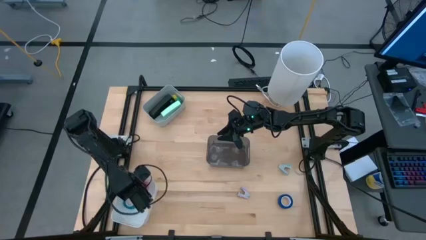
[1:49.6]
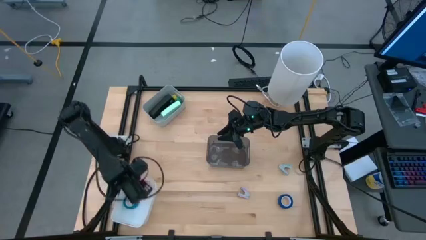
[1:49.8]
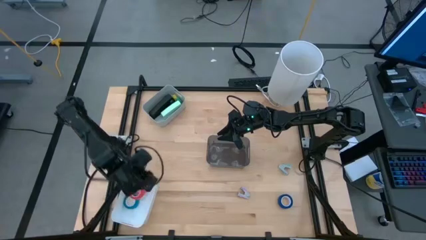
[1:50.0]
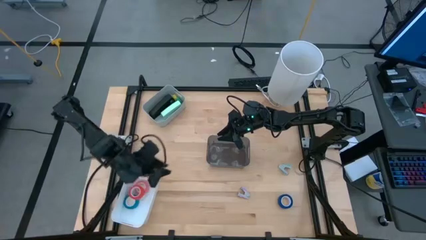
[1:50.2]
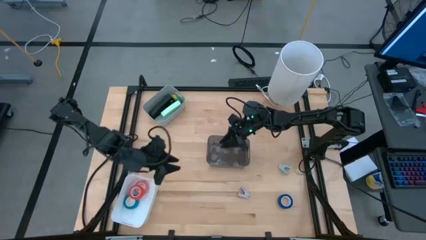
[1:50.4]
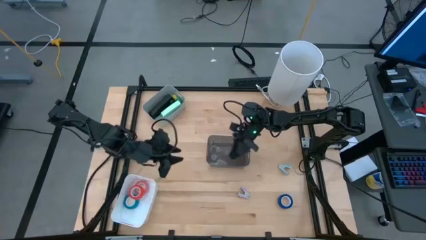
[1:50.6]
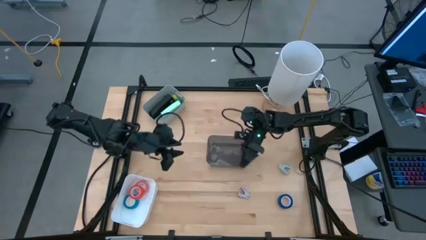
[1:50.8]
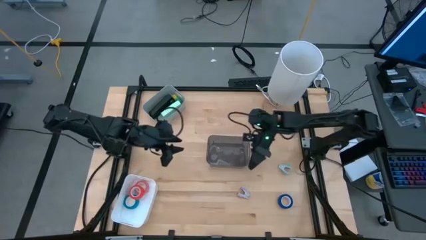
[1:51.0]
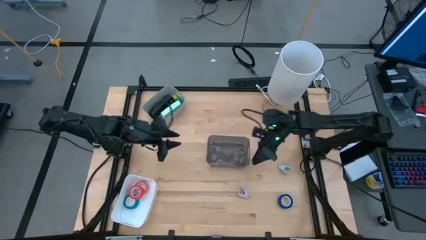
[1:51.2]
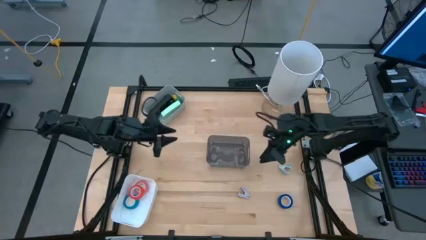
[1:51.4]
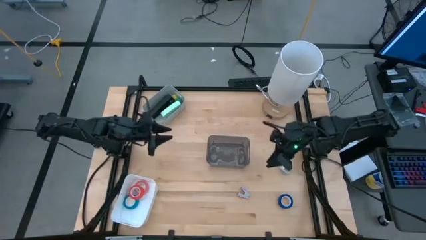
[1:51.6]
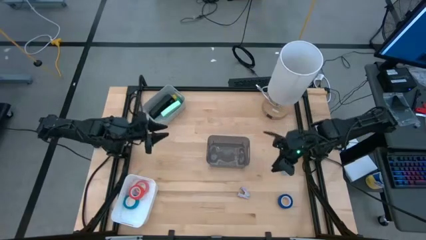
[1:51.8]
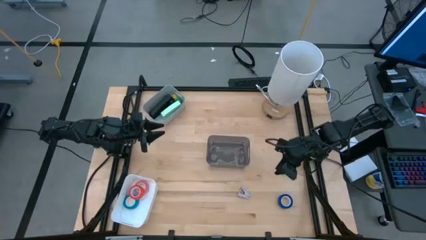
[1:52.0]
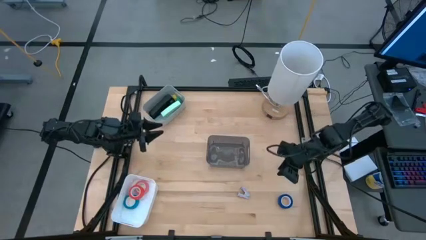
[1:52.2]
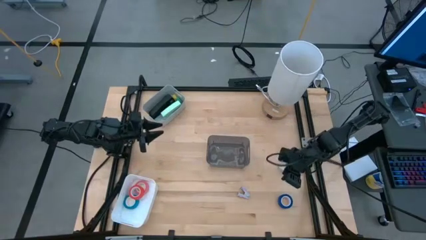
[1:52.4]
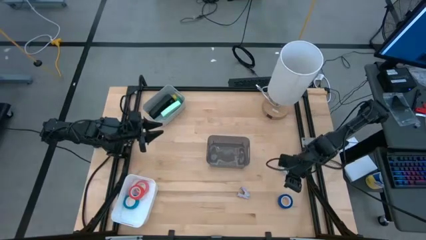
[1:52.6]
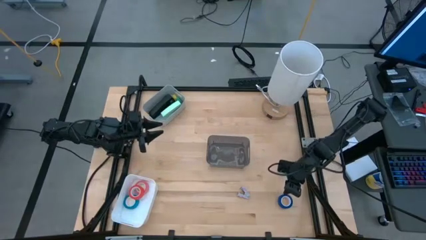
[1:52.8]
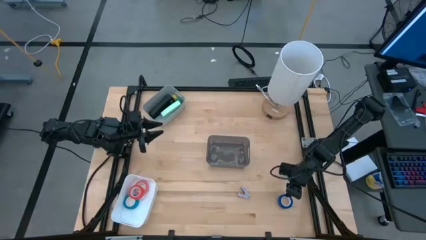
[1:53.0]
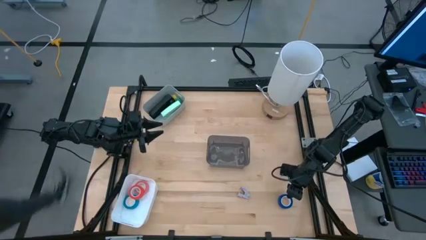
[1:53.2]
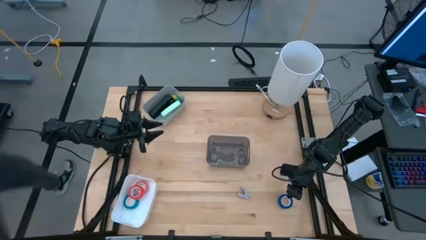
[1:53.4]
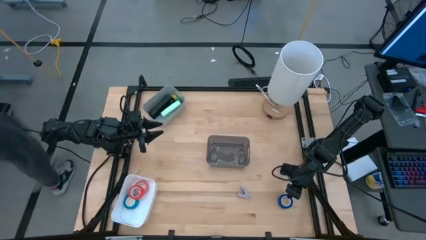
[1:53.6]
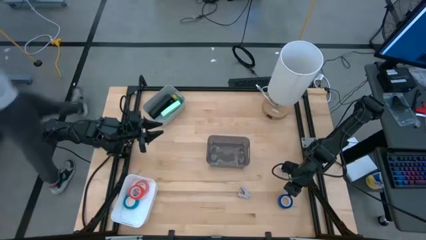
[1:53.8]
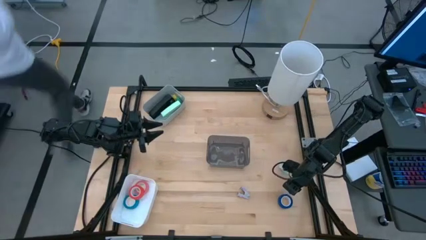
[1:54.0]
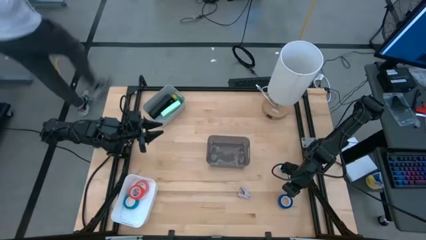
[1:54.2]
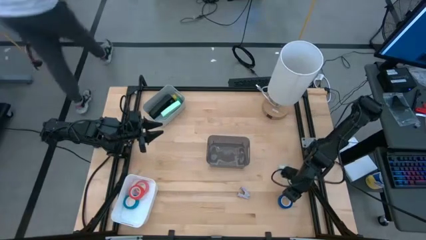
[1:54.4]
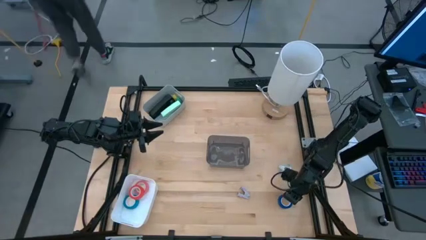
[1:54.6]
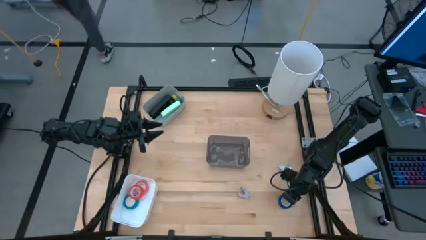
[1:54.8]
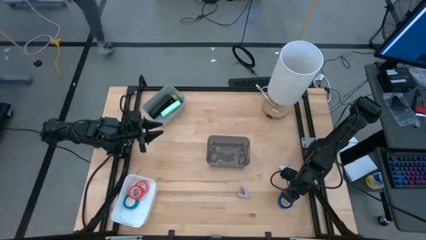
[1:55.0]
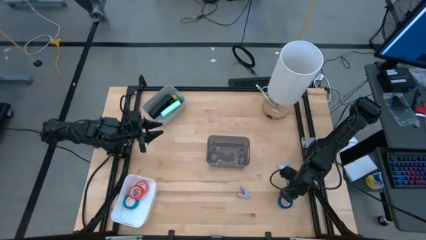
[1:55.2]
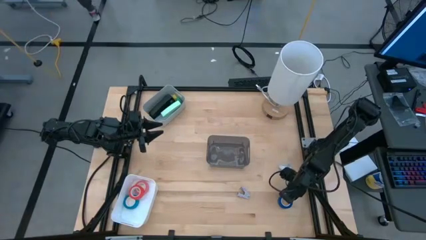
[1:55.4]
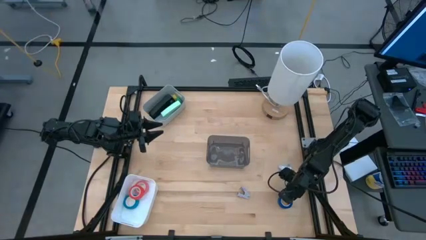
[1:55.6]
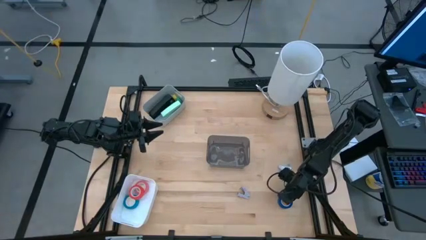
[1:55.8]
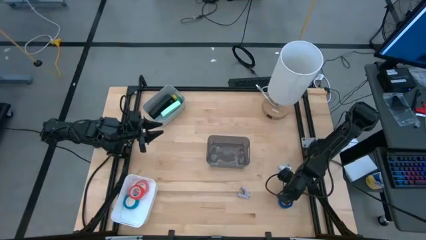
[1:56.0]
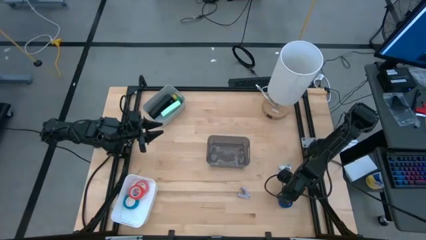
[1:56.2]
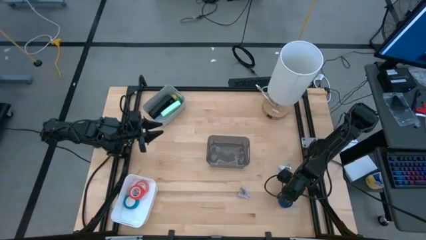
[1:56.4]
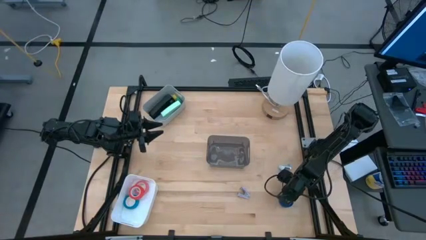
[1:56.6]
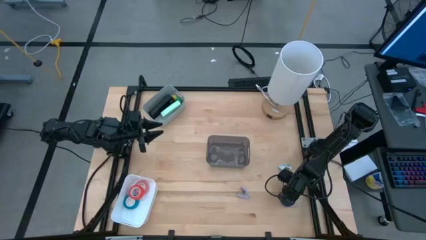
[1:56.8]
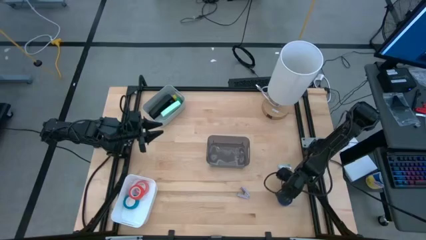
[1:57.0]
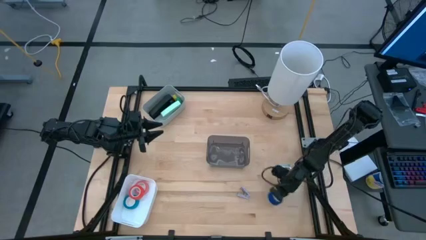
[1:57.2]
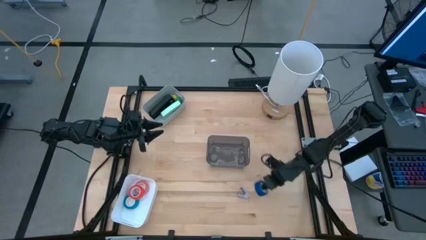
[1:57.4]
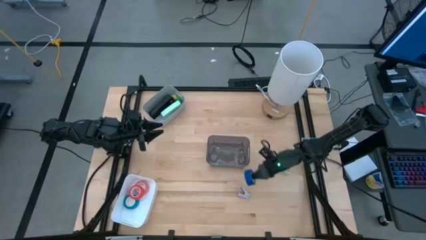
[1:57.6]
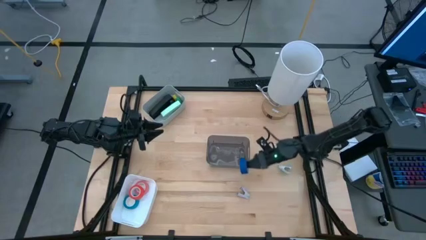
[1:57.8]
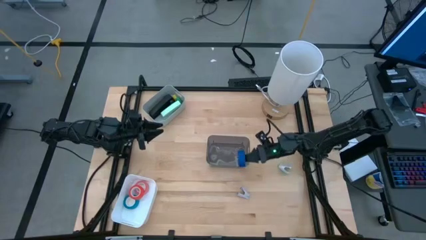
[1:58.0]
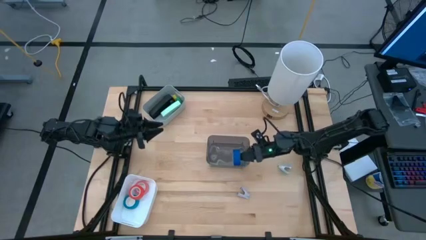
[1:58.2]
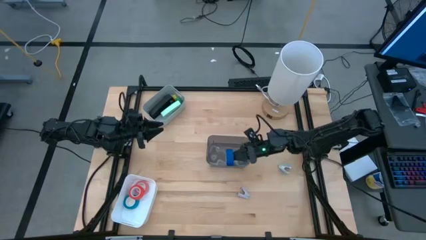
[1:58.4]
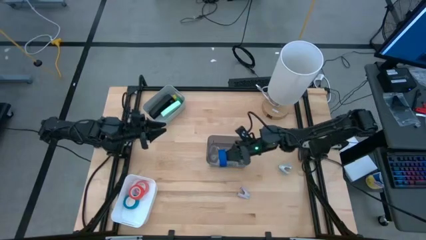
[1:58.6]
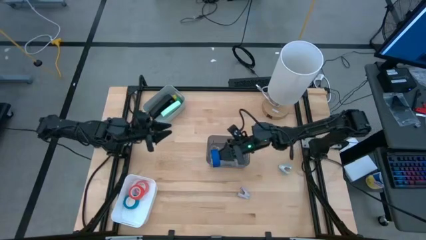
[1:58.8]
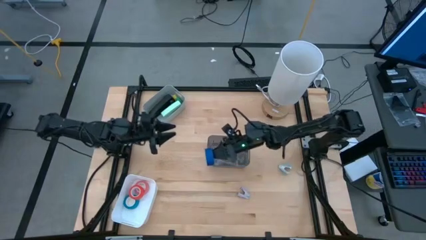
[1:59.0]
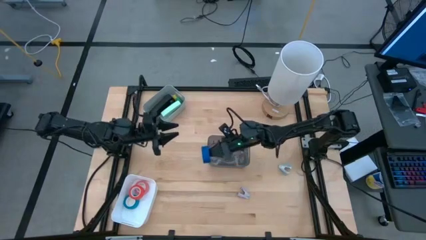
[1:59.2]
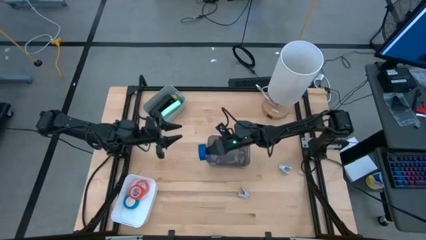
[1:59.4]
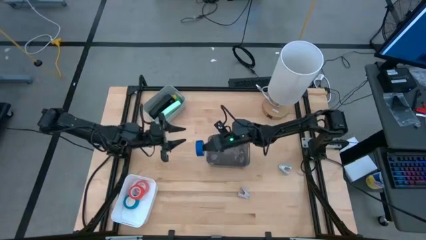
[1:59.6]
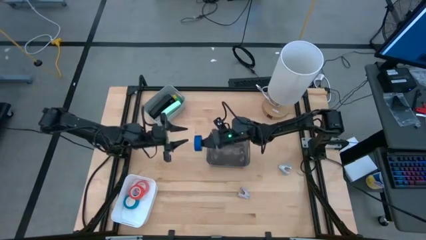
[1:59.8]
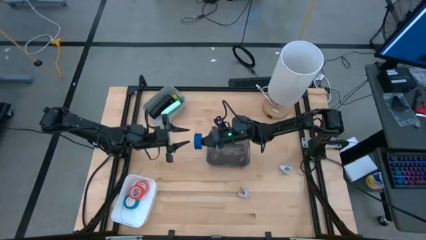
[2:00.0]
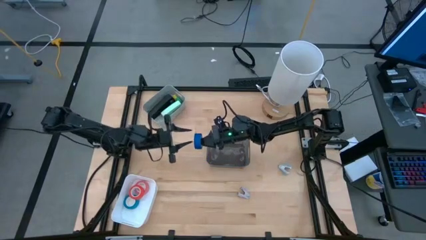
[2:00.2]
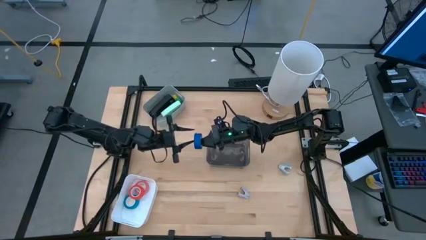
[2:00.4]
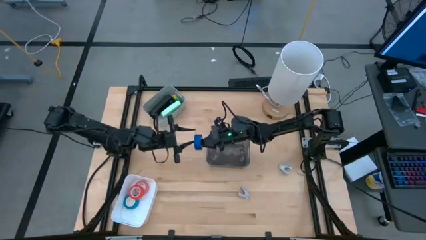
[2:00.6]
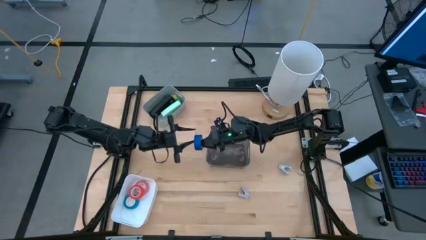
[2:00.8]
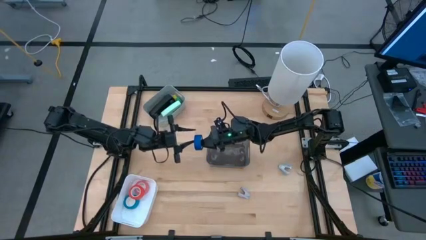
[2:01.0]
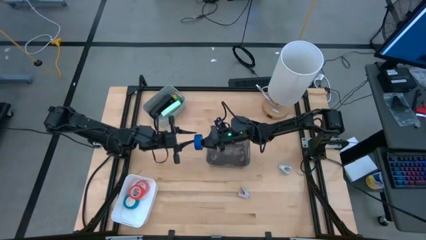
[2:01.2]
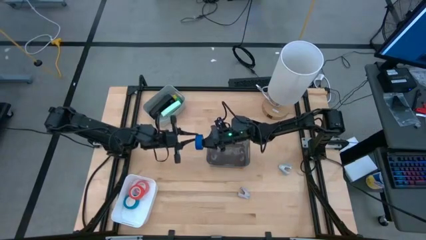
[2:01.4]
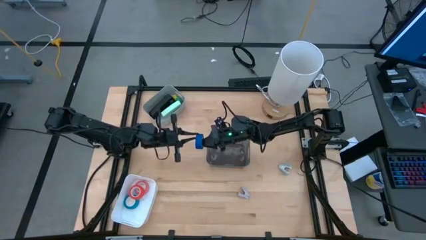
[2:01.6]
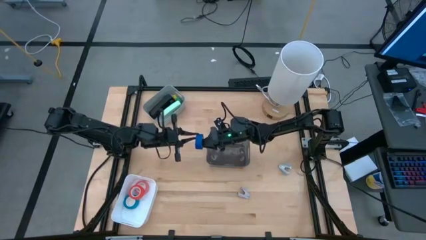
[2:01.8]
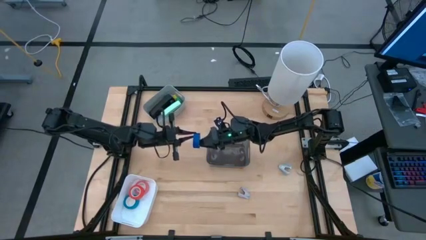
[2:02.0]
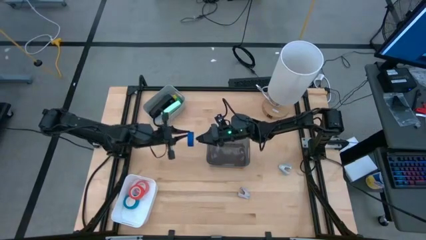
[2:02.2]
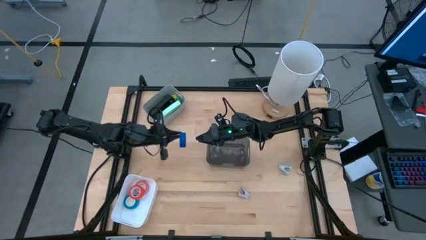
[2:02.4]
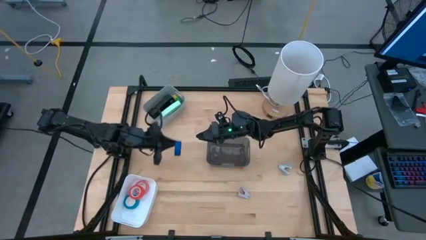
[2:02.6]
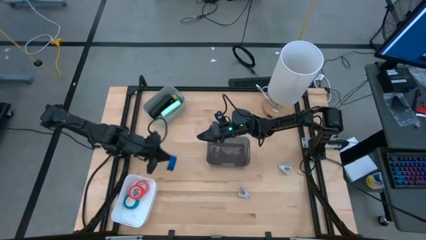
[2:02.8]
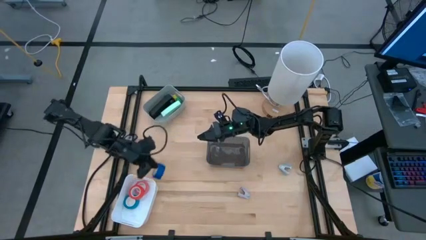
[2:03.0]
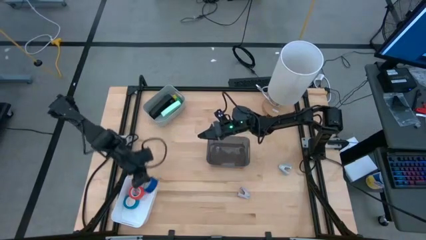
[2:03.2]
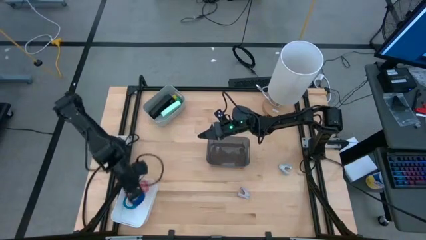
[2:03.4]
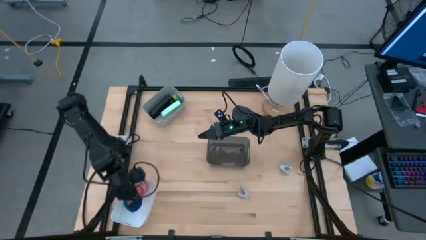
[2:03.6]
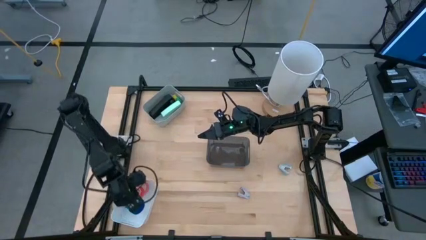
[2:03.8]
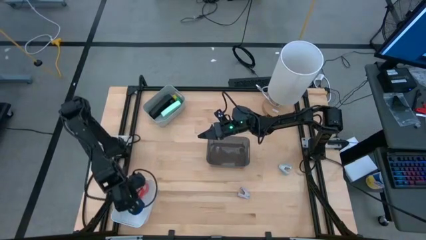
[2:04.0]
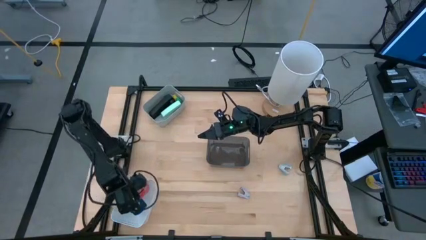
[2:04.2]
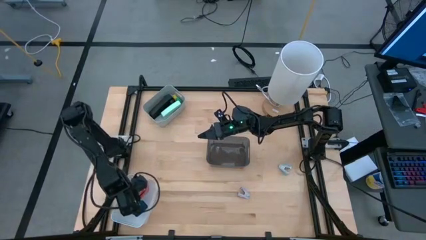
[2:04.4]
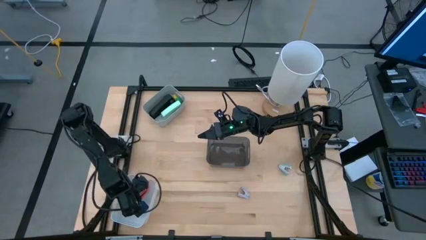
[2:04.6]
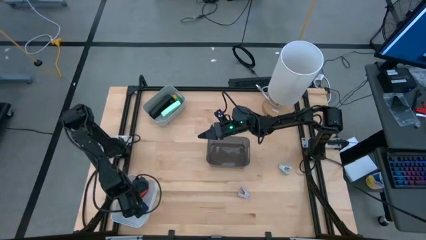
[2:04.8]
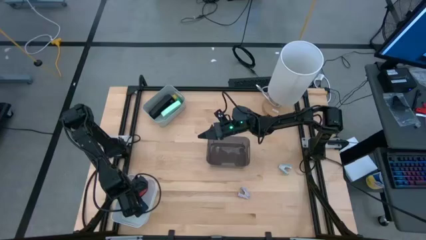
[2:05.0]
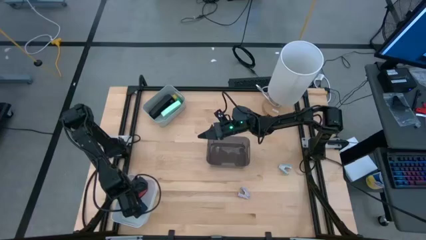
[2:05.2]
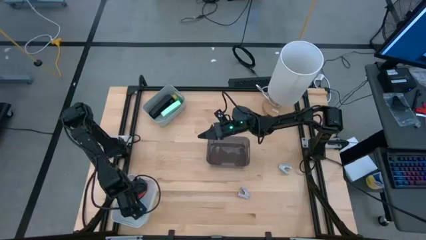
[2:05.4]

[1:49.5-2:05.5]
Task: Pick and place Stapler, Stapler remover, tape
Put the blue tape into the white bin

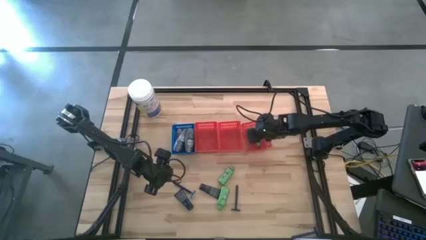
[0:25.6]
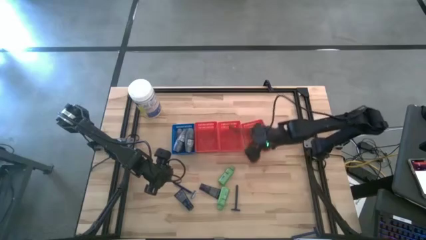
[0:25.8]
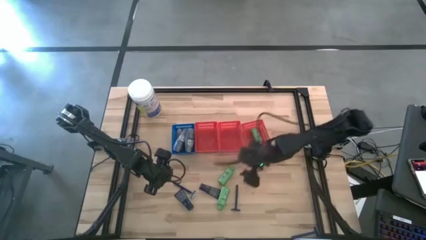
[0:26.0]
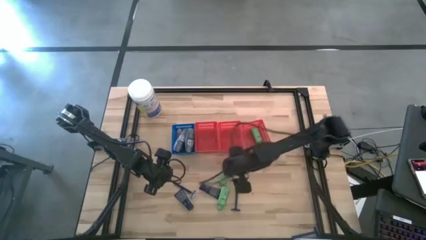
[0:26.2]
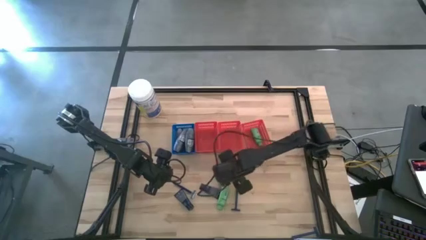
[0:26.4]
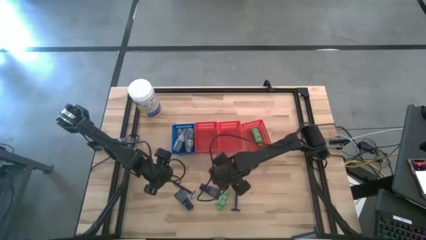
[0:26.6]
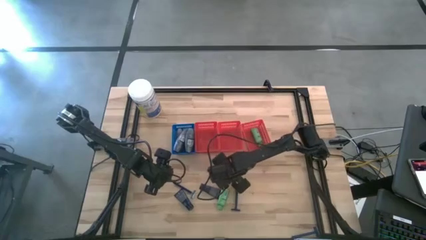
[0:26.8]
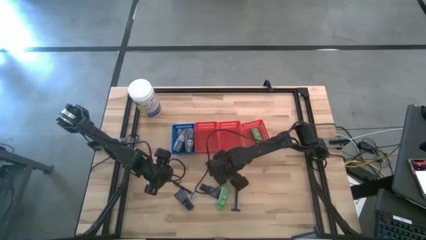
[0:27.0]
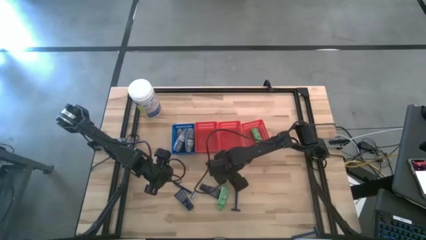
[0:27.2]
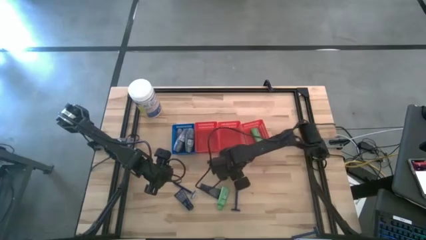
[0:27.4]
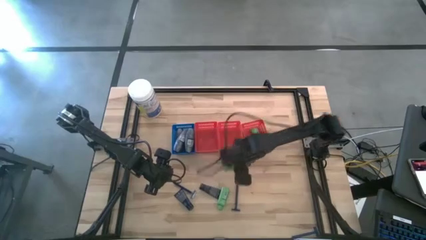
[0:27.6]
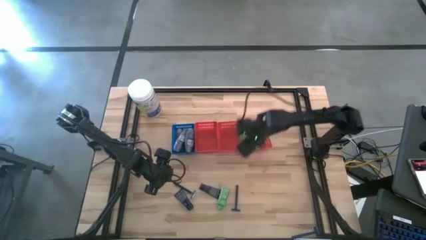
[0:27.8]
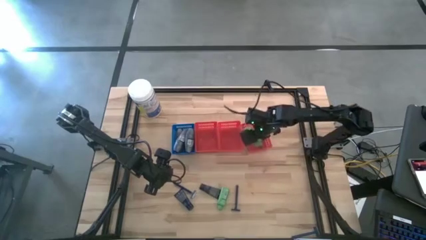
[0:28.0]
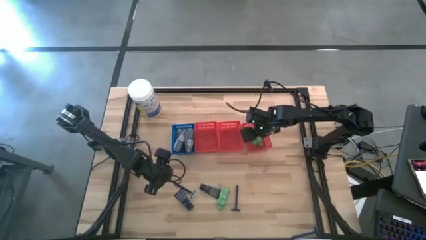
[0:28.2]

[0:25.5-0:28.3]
Task: Pick & Place Travel size toiletries
Put the shampoo into the right red bin
